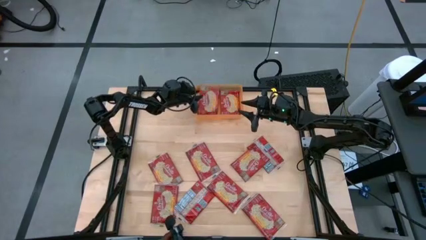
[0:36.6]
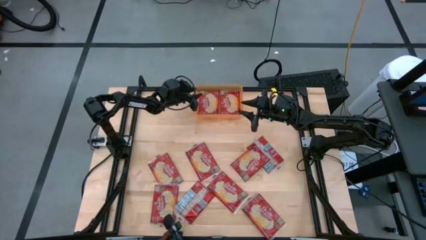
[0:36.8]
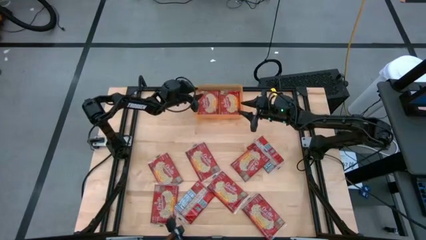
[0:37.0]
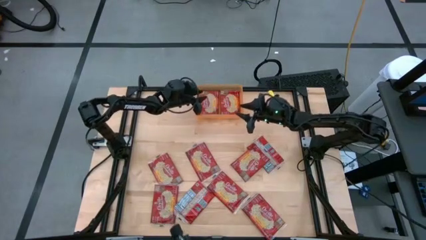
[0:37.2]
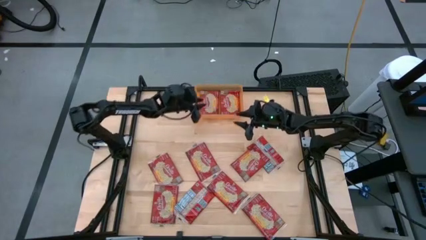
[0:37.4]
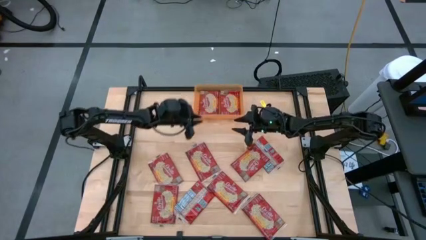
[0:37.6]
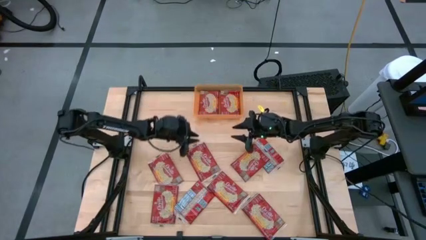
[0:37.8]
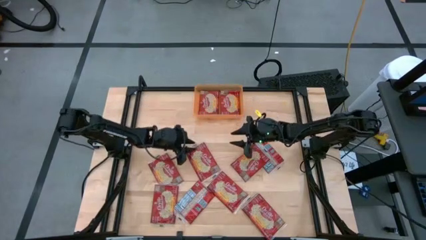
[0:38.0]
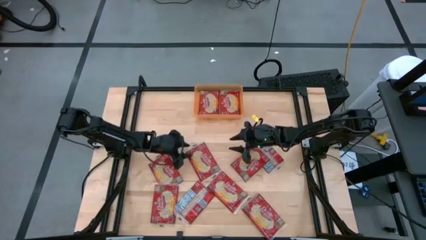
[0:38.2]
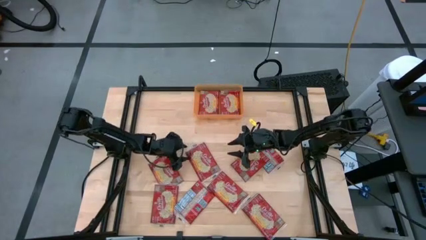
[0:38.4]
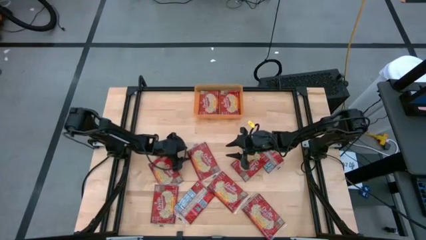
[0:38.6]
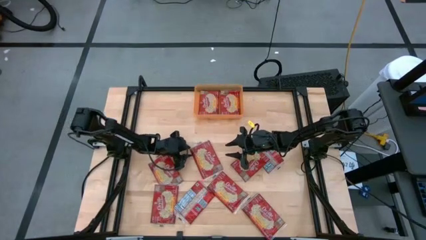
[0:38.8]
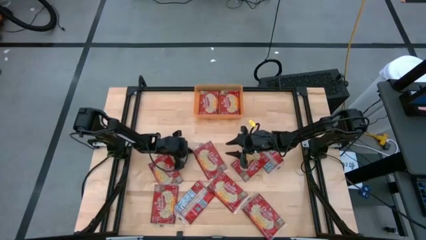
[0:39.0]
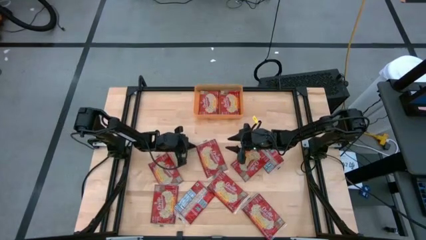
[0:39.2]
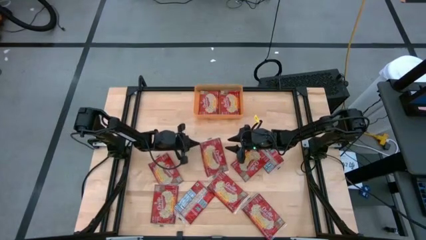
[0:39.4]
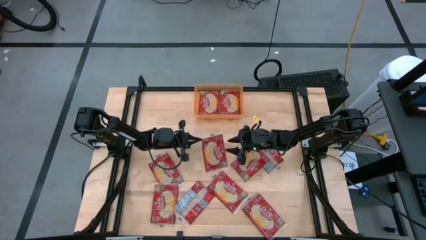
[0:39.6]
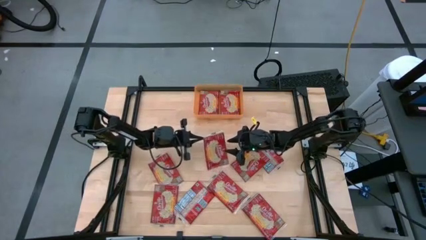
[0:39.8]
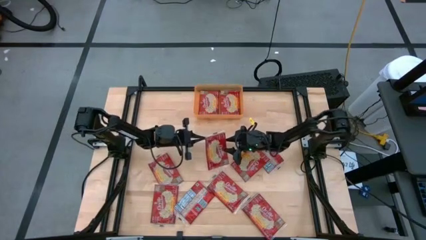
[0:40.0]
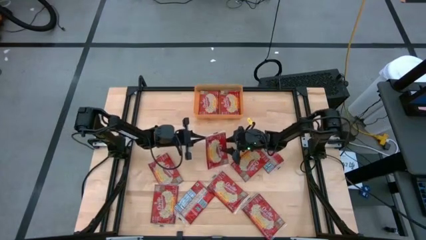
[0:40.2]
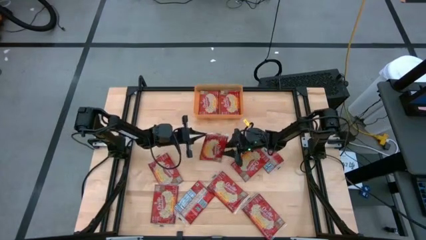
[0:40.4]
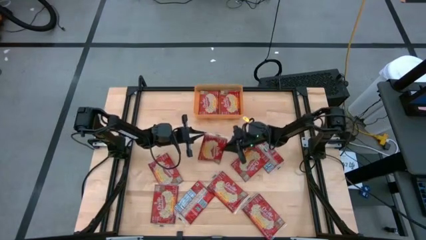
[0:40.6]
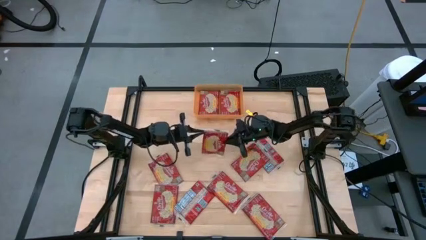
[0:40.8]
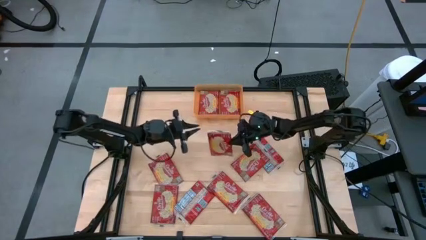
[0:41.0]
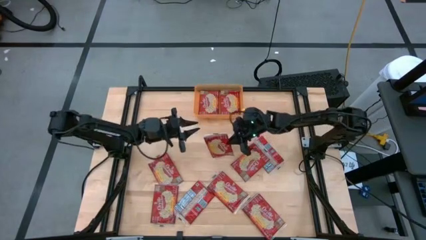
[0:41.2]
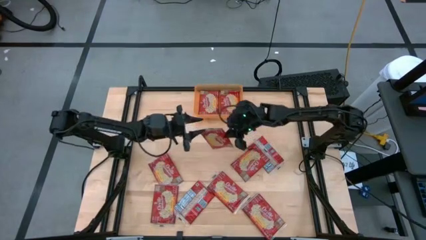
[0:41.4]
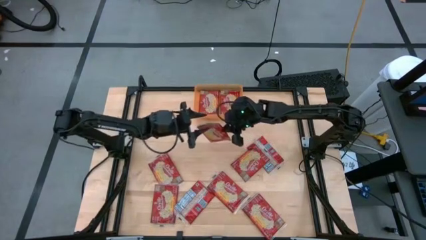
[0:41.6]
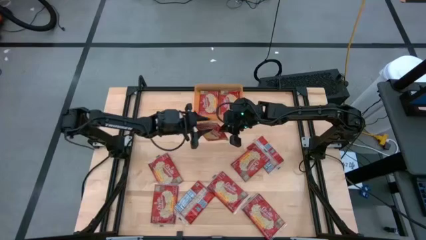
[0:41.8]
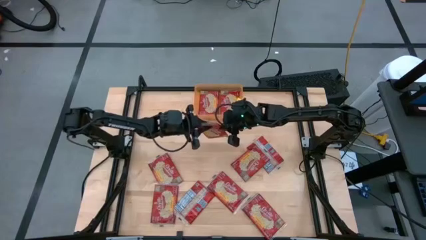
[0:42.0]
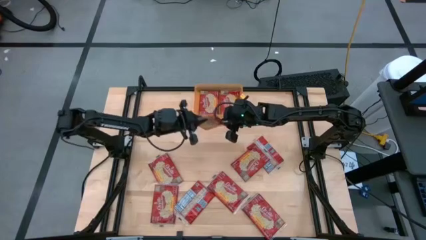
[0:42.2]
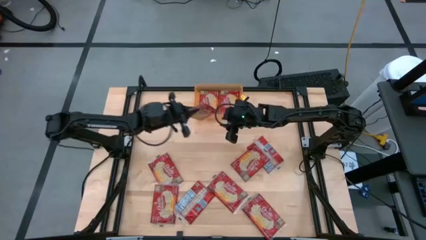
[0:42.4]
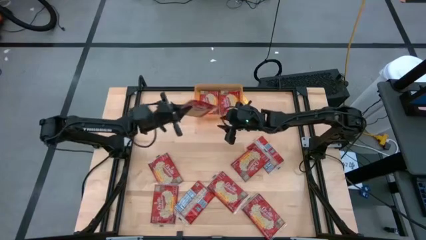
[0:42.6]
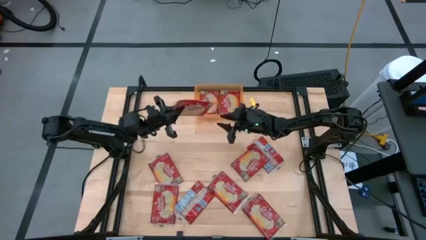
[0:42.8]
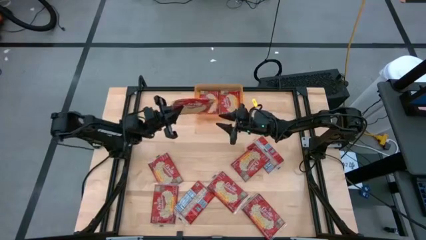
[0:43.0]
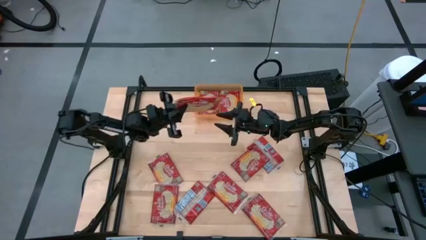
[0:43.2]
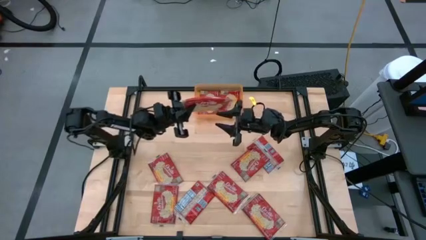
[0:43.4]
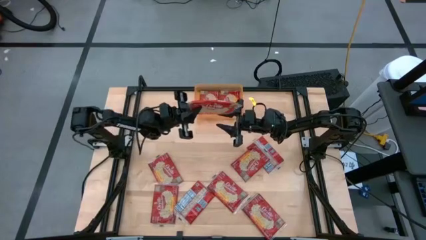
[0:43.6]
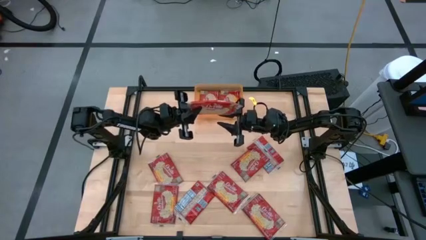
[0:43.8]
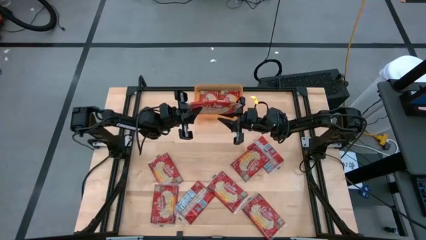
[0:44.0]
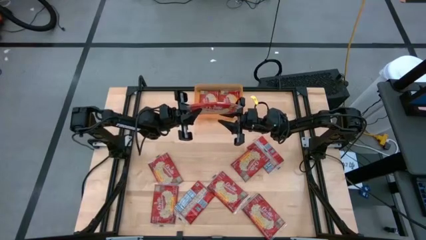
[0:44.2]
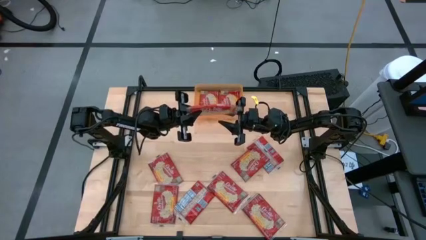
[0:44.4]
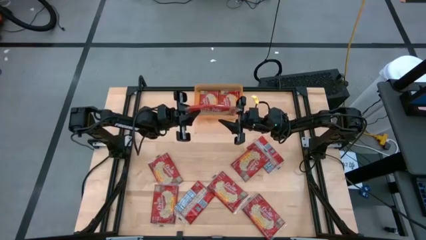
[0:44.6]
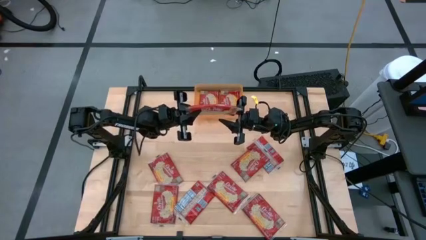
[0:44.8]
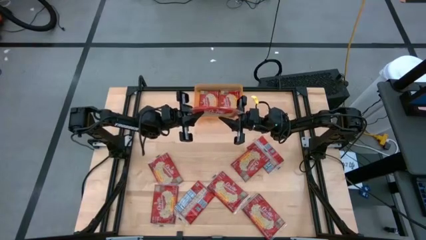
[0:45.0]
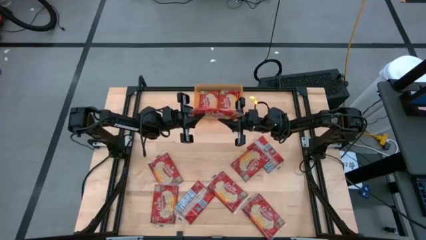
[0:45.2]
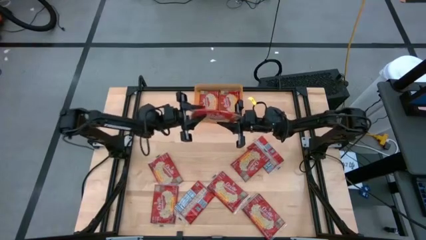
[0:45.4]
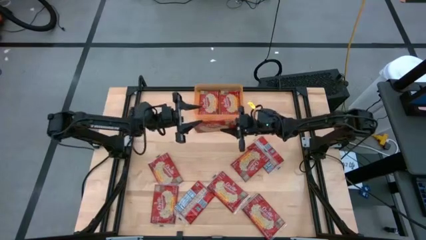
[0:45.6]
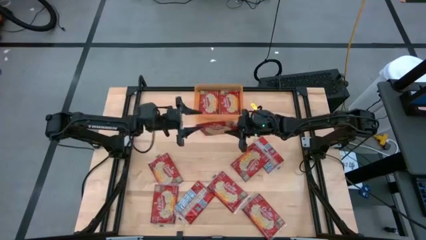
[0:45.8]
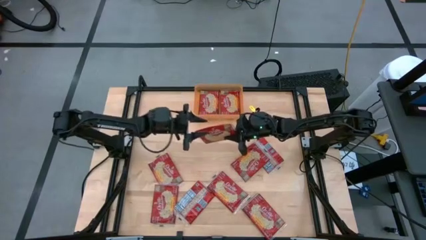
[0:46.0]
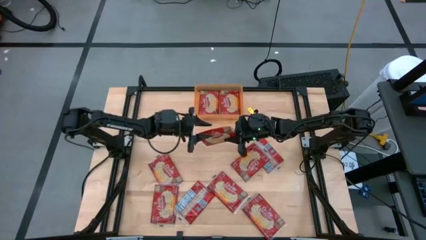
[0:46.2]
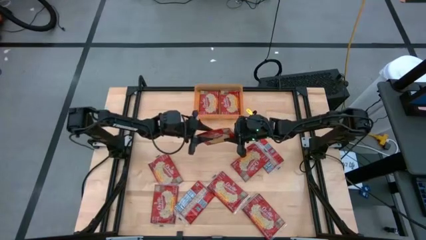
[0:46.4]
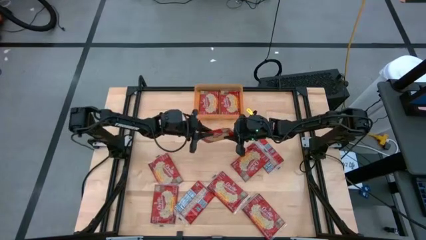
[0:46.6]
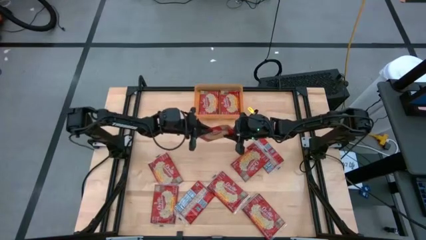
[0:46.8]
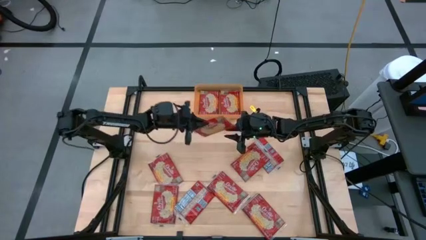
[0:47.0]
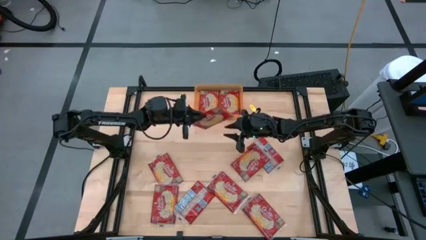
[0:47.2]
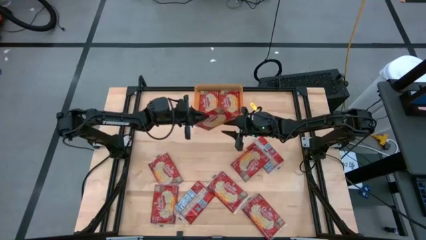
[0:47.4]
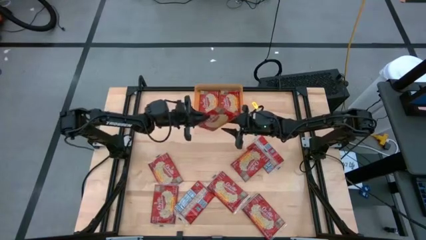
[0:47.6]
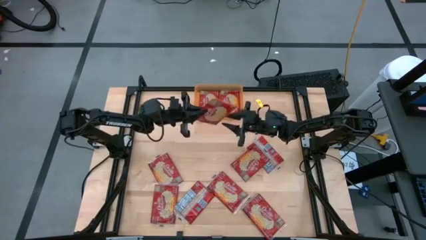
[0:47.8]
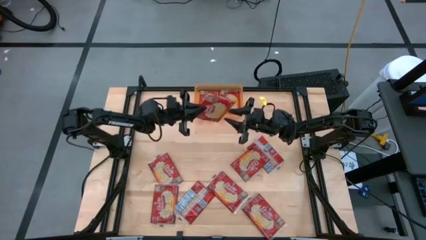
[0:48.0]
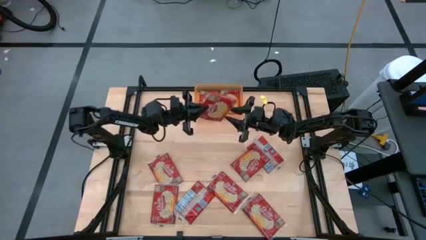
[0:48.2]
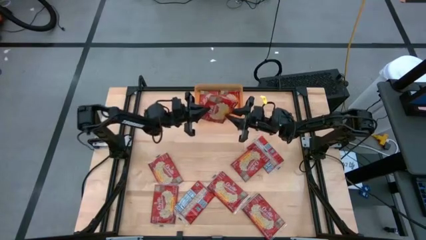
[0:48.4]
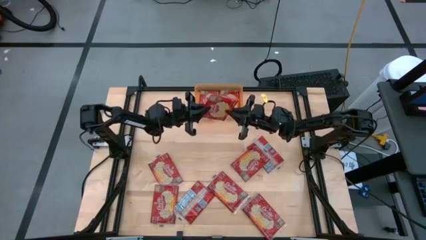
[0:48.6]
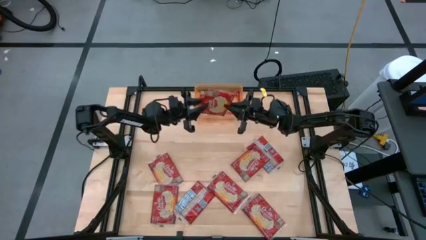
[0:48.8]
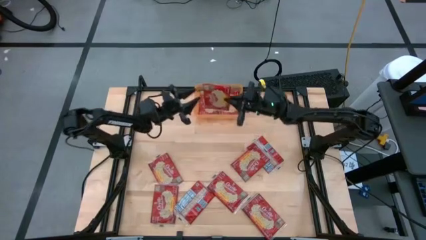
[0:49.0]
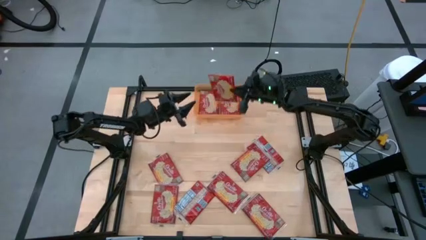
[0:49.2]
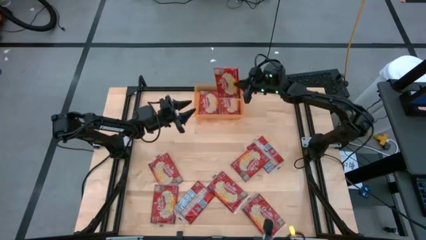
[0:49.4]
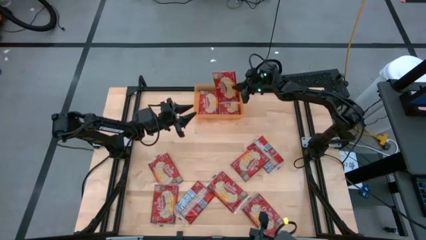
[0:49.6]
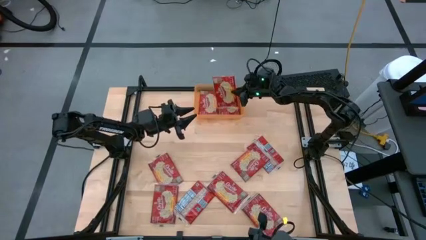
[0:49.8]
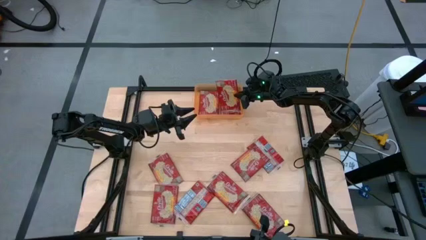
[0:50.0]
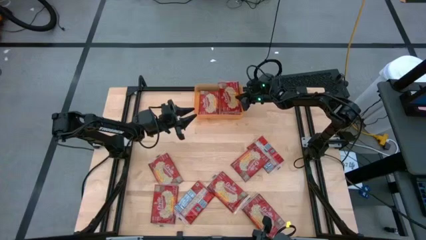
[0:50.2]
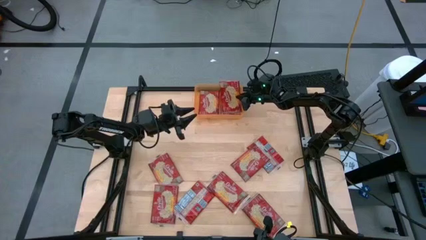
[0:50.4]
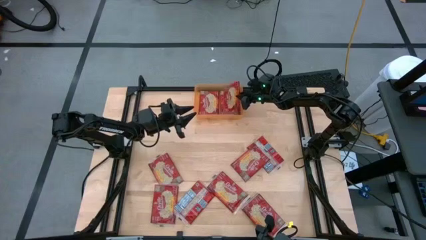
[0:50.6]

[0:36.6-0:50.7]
Task: Sort popcorn bags into baskets
Put the popcorn pack into the orange bin

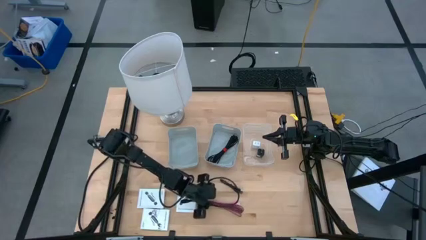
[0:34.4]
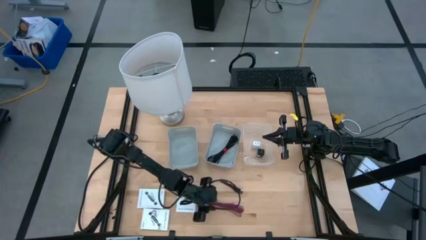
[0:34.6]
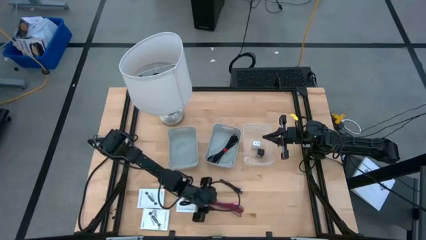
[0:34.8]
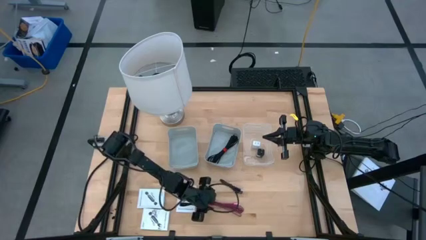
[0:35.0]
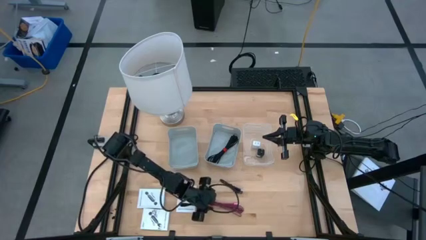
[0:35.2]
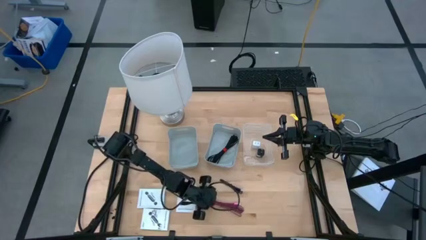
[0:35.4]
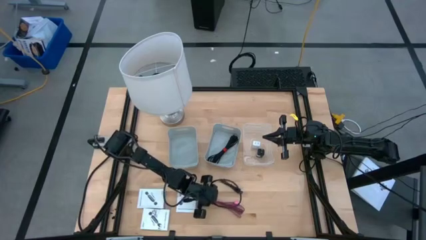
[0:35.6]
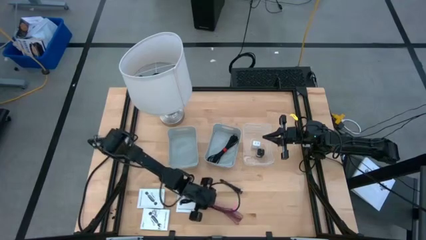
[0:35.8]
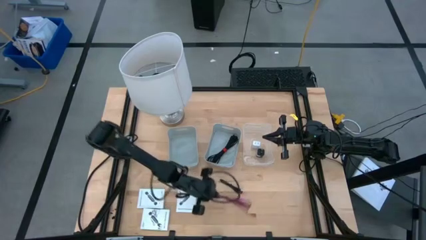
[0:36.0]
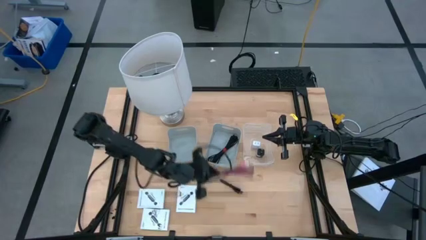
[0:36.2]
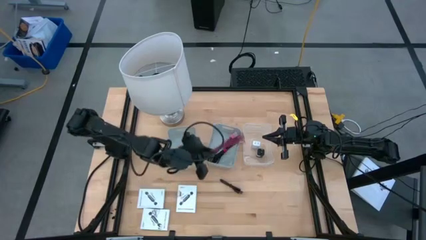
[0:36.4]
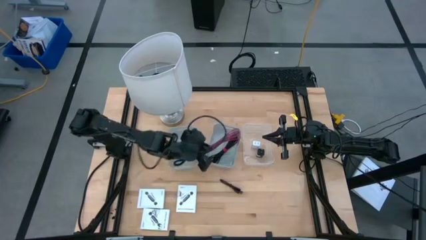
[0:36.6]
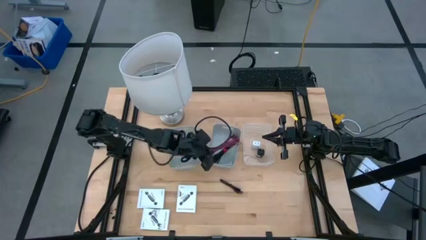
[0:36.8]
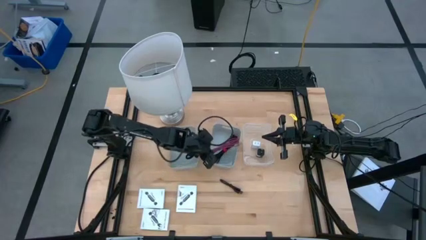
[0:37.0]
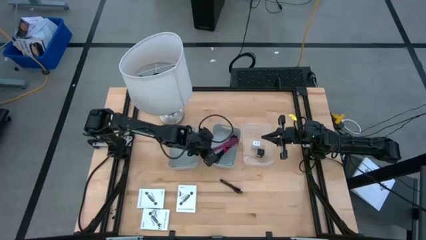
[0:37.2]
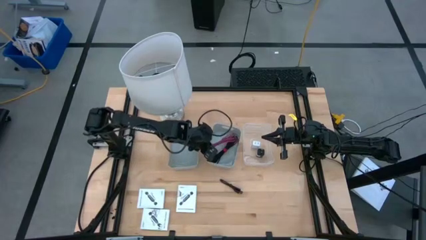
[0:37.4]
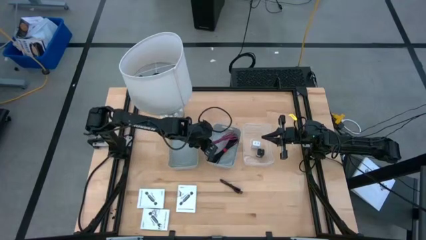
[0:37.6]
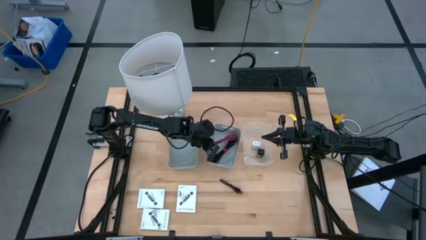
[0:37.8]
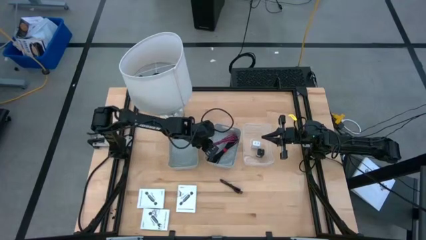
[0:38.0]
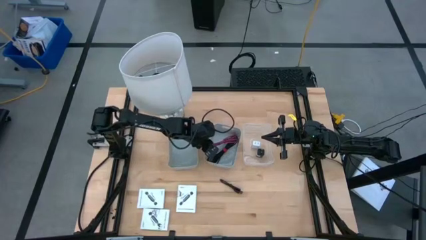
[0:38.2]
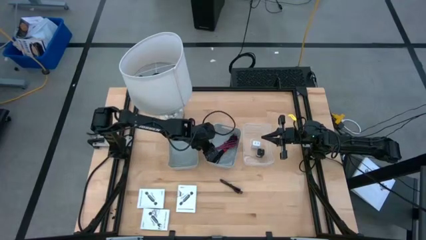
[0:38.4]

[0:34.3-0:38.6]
Task: Pick and place items into bin
Put the pink charger cable into the right gray bin
